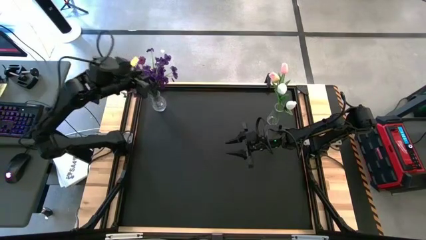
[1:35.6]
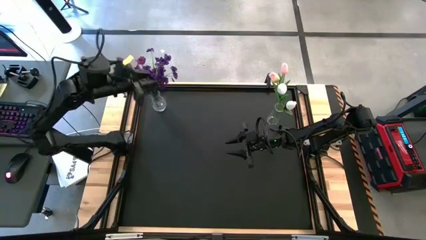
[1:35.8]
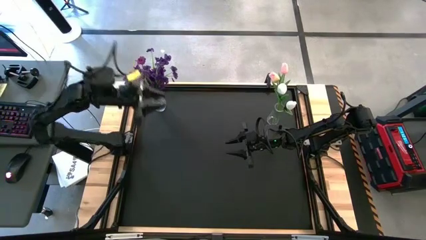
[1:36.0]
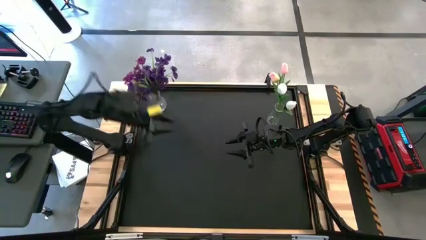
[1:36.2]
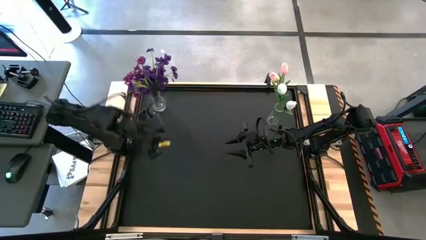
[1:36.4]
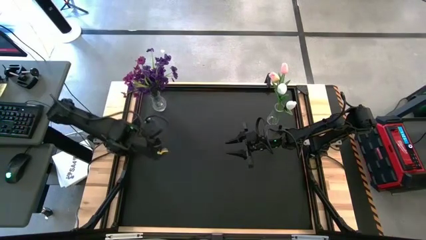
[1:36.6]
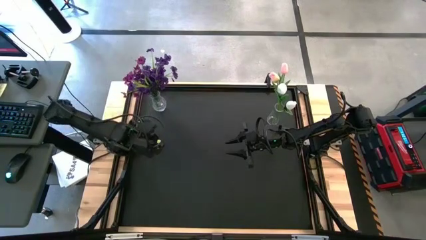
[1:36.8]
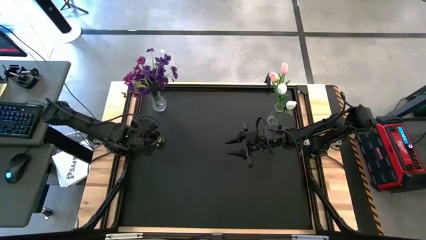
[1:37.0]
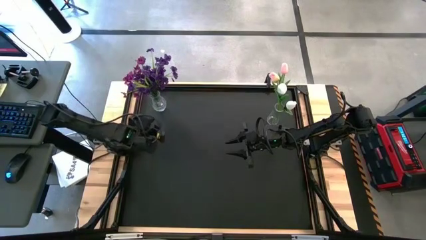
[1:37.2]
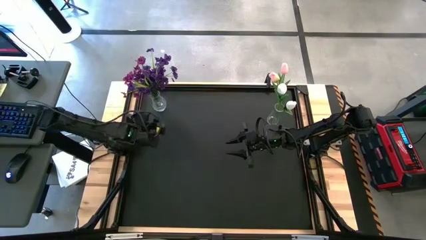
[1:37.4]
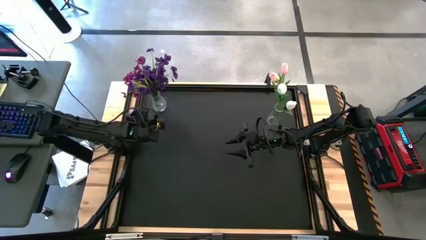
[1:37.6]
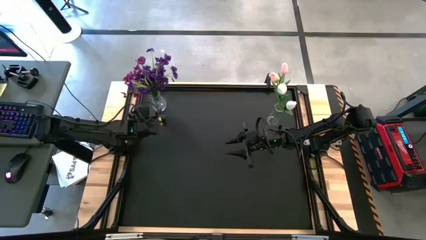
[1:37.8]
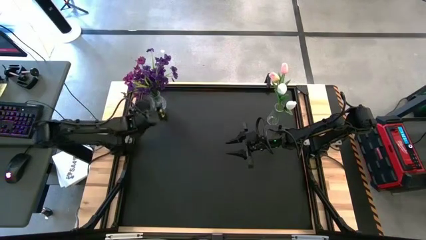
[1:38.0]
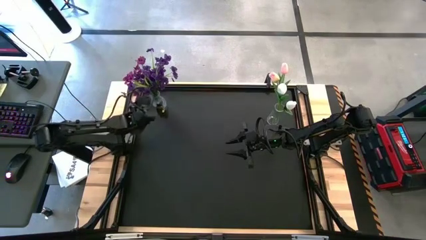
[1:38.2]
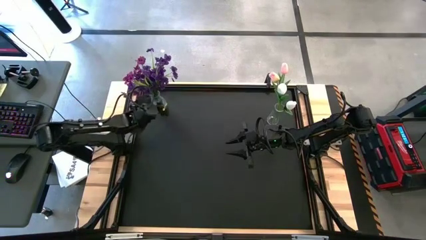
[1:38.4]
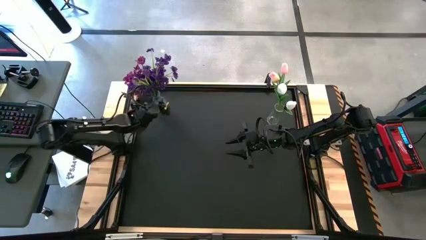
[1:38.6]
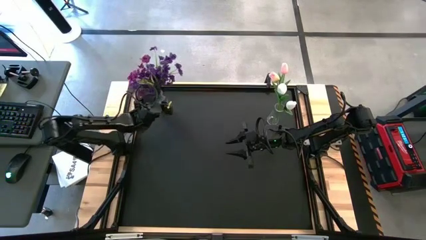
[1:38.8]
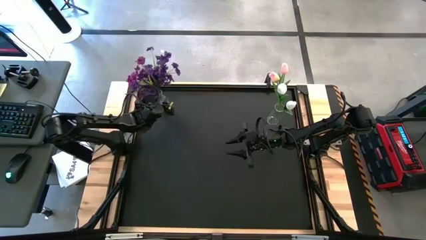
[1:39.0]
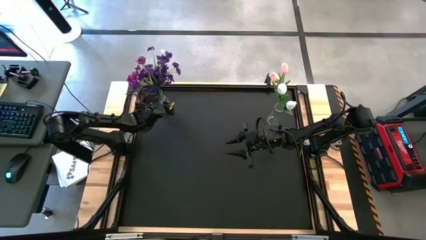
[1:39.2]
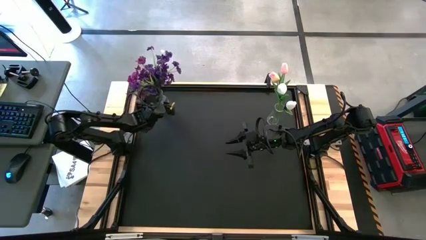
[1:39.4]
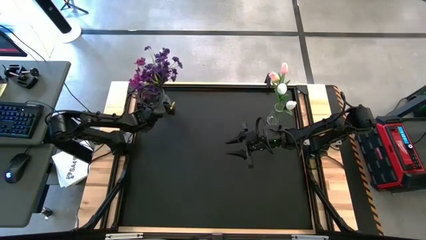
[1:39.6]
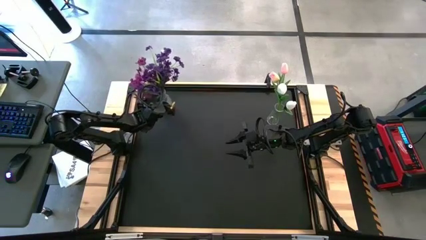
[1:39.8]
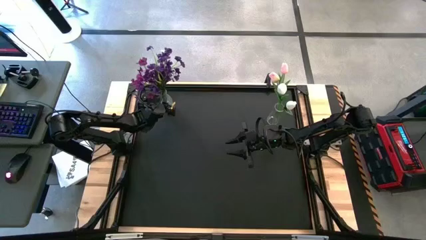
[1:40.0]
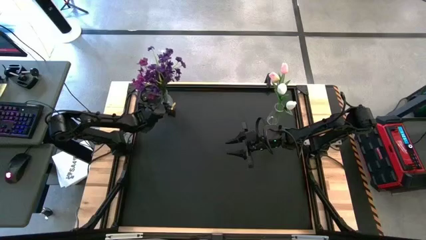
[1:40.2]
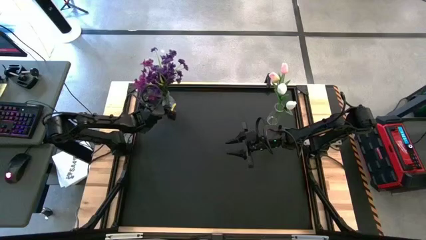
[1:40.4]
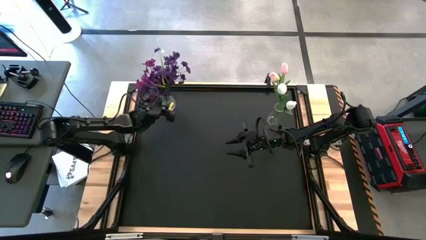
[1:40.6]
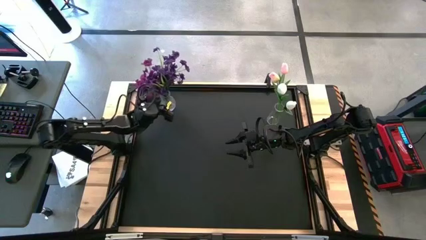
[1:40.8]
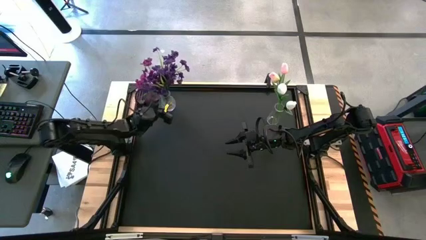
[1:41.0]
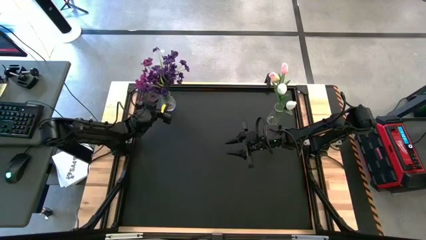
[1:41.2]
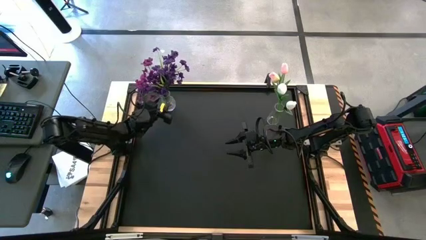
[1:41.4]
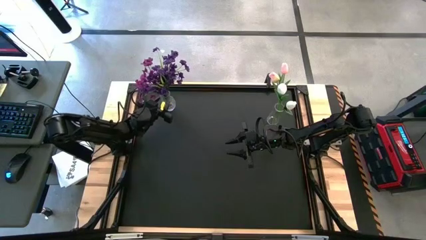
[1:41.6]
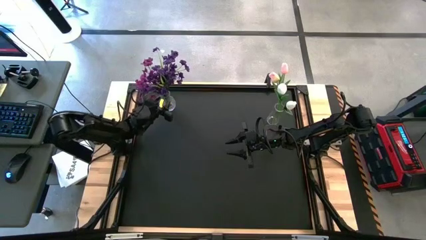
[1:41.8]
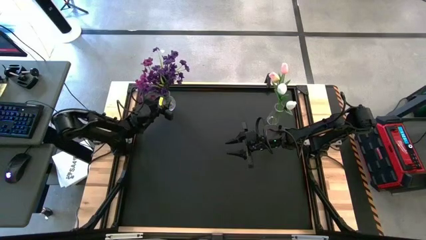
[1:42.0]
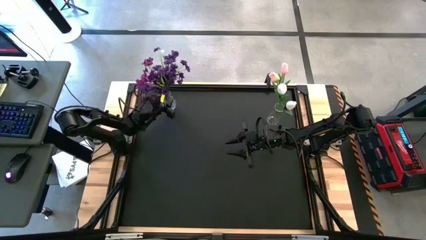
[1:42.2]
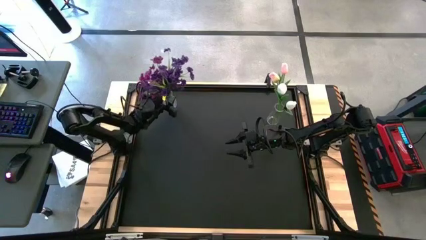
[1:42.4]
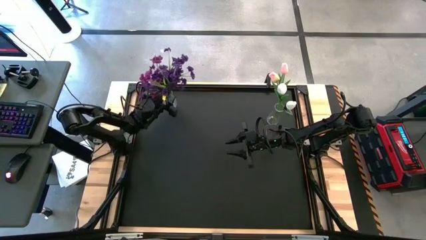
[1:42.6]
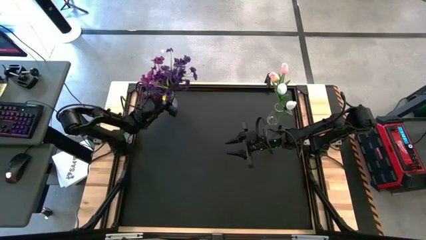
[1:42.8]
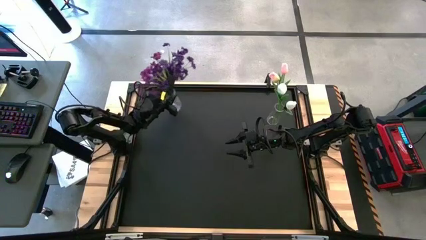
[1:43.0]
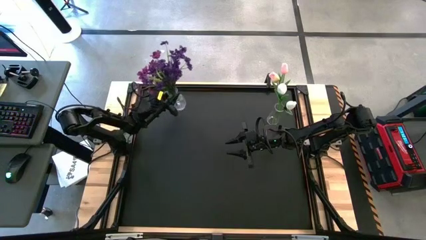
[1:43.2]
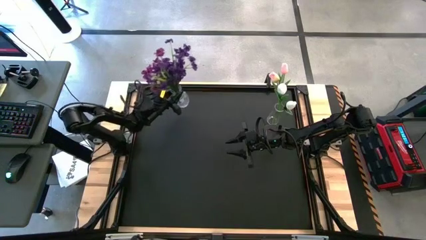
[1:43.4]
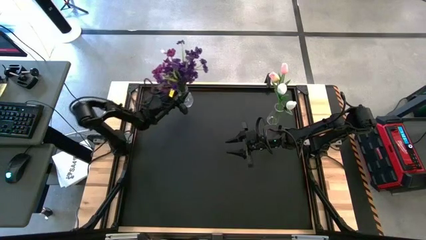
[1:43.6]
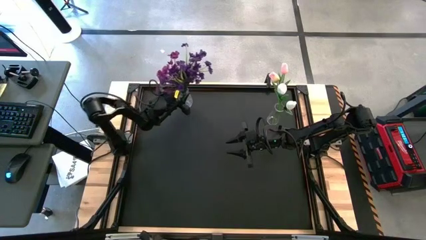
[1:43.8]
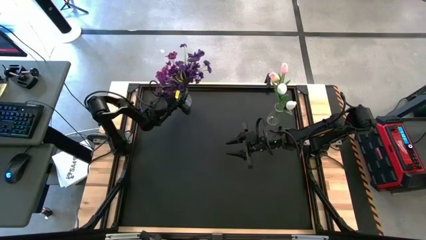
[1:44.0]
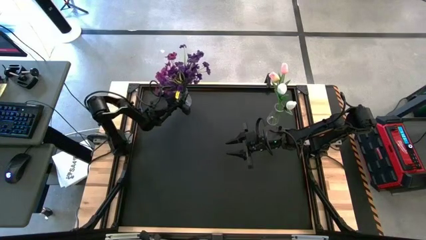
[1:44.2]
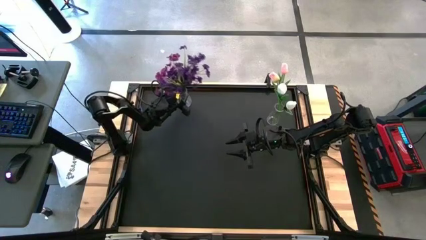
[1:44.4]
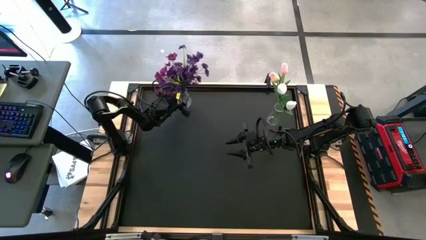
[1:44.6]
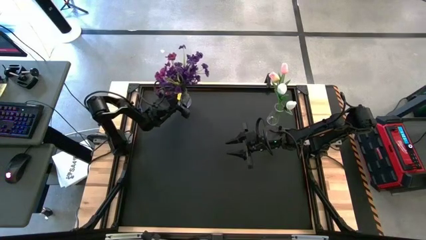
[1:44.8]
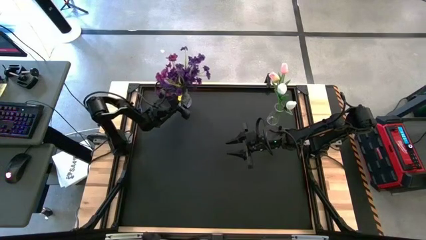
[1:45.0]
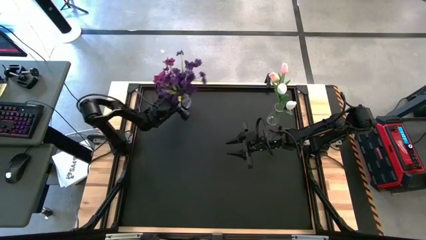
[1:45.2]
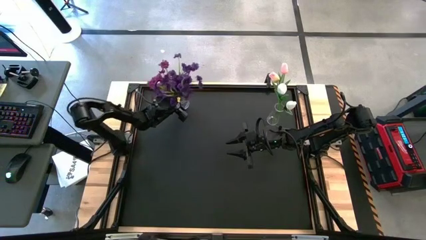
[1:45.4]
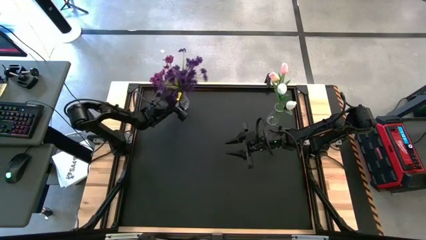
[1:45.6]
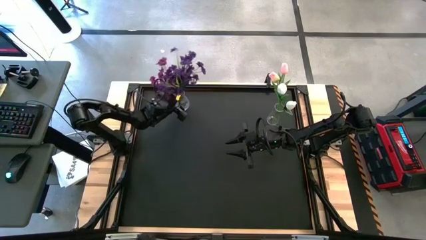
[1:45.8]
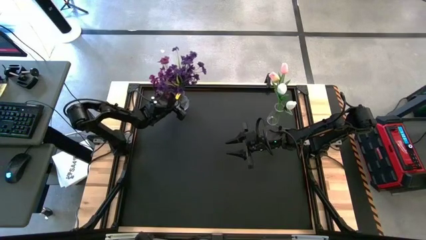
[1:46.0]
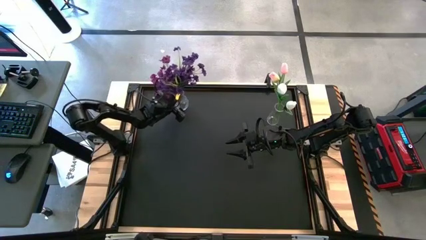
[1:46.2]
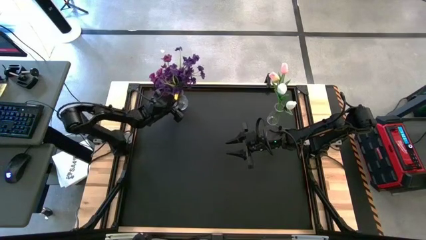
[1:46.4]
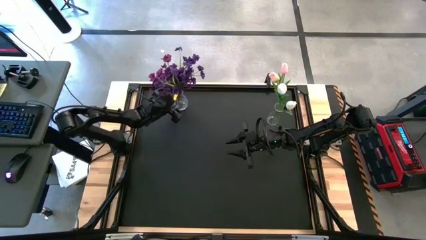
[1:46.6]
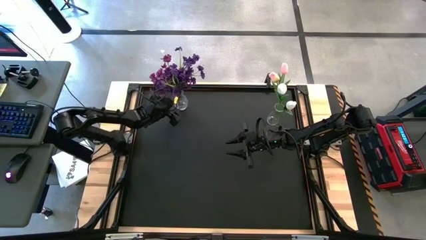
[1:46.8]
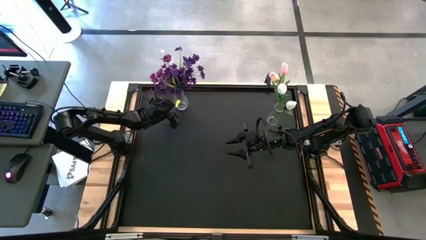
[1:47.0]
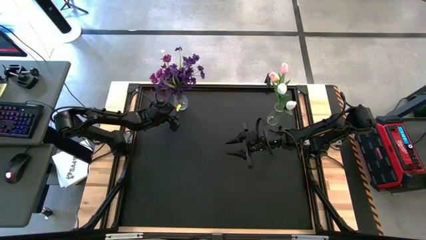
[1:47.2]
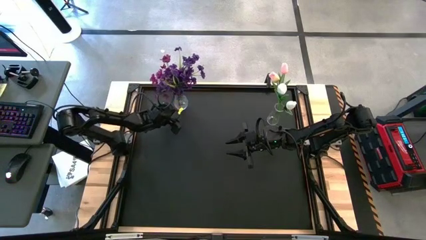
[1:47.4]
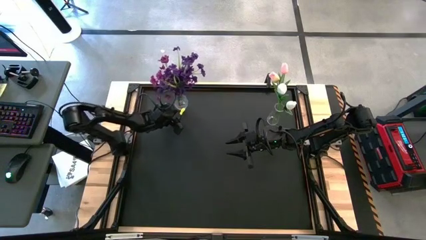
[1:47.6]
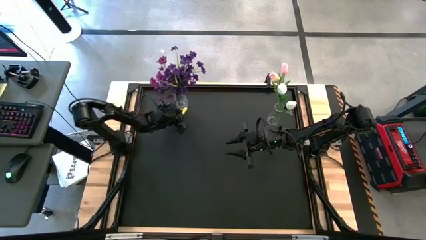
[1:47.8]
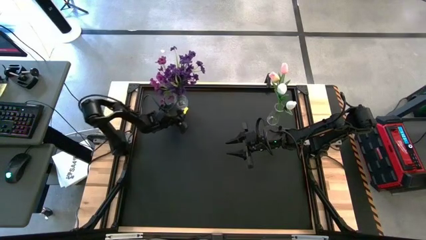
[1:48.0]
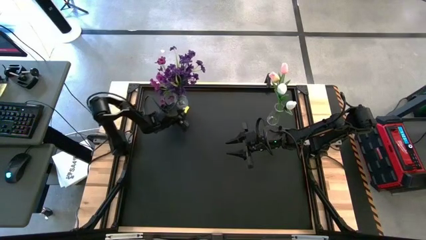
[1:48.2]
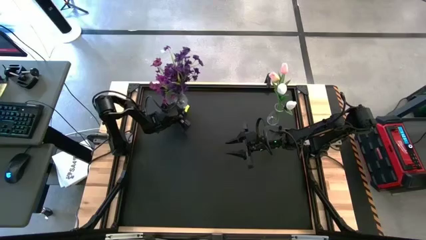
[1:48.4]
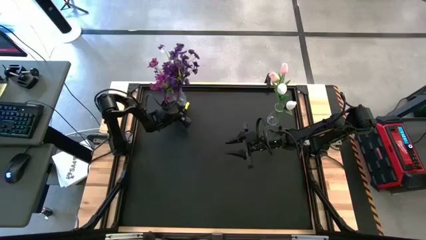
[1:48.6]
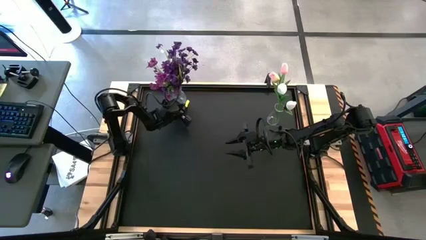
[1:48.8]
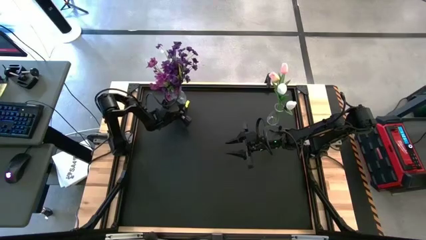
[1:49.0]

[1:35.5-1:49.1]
Task: Sort flowers into vase by color
Adjust the left transparent vase

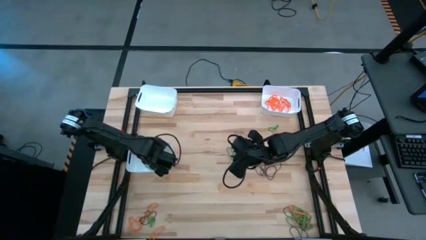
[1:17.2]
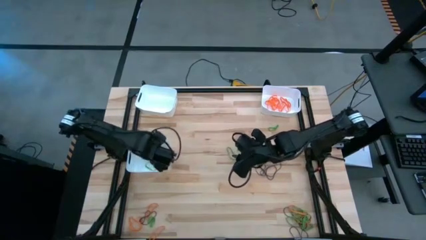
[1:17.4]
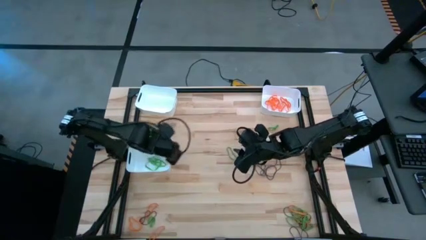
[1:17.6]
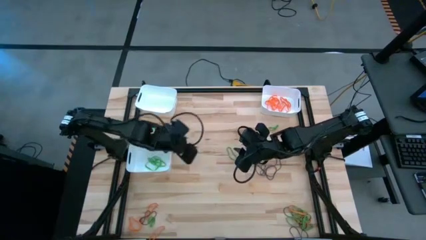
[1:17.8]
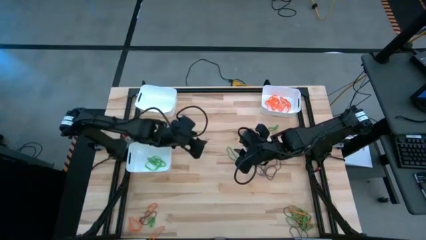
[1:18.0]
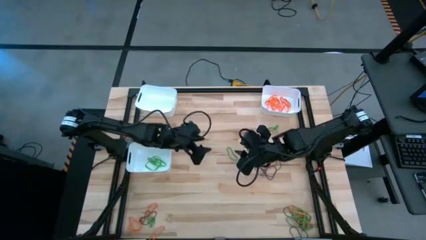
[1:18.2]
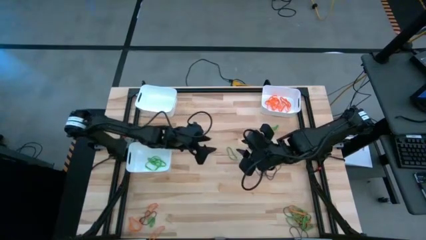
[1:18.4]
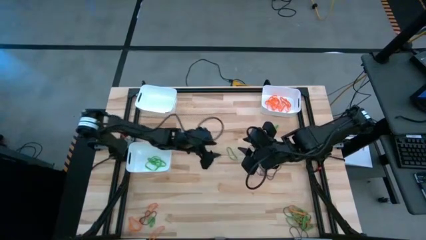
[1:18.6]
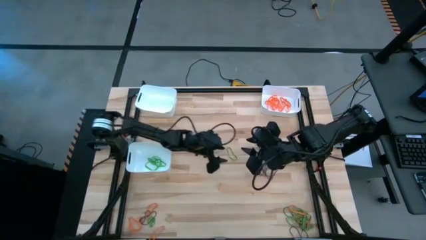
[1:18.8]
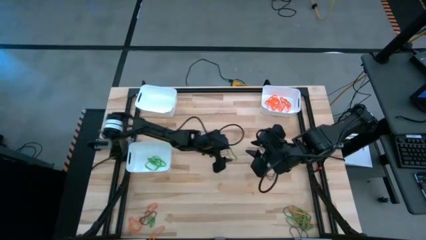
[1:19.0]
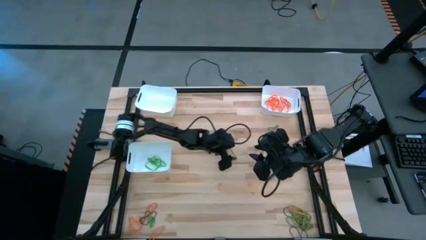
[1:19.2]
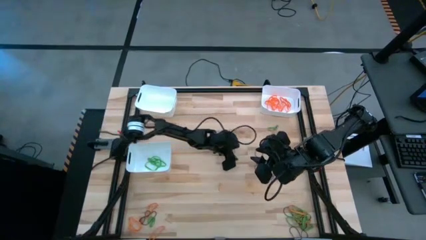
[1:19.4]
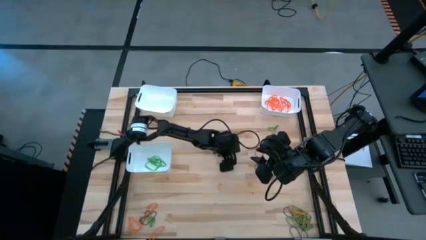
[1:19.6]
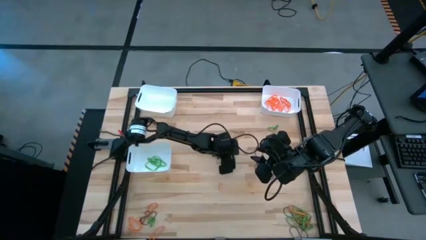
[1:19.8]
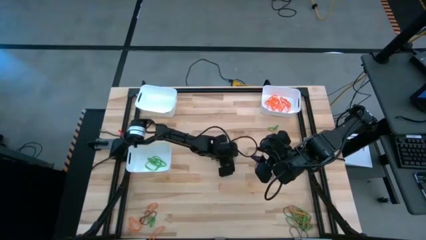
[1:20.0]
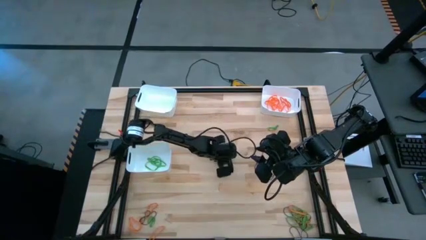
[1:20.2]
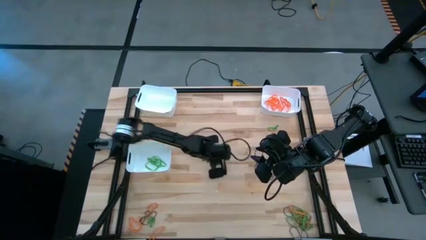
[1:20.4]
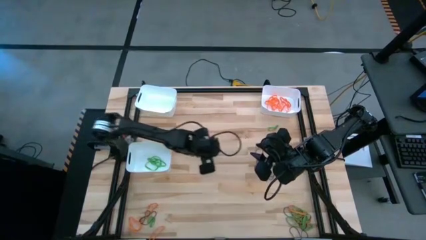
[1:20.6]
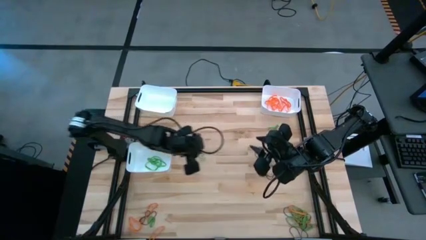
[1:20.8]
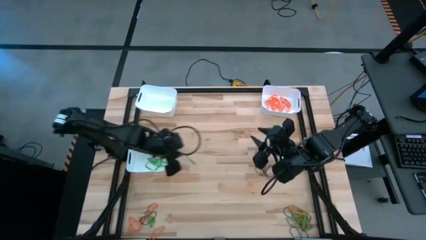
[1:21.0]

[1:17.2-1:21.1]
Task: Sort rubber bands into baskets
Put the green rubber band into the bottom white bin
